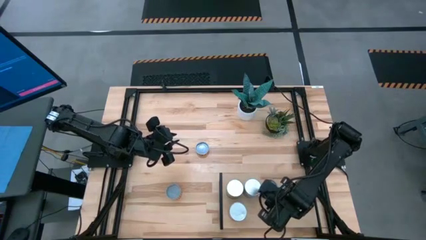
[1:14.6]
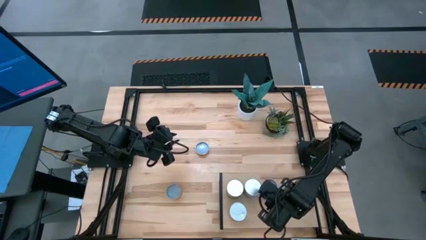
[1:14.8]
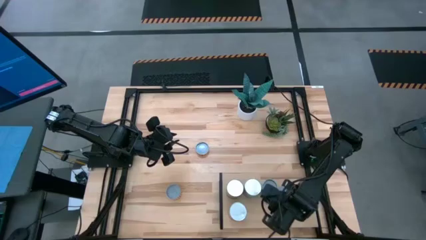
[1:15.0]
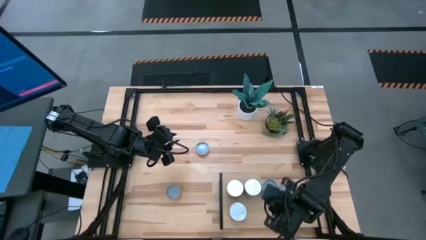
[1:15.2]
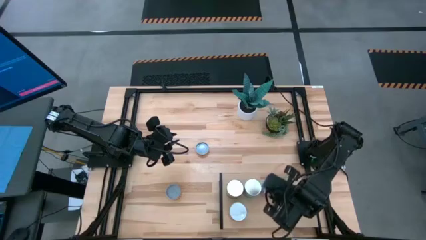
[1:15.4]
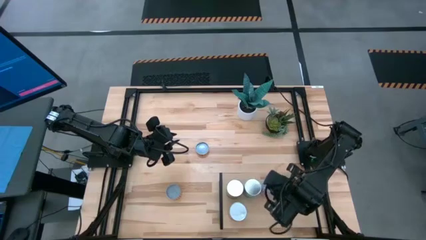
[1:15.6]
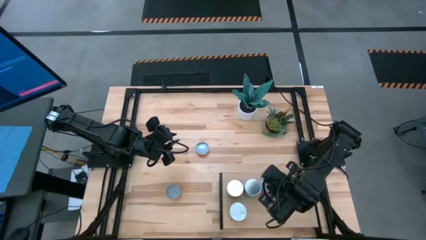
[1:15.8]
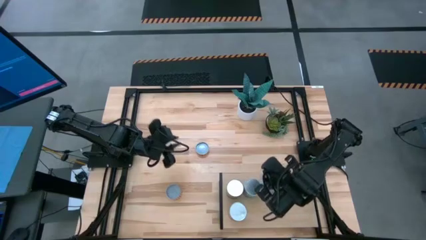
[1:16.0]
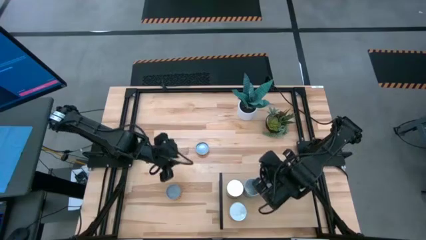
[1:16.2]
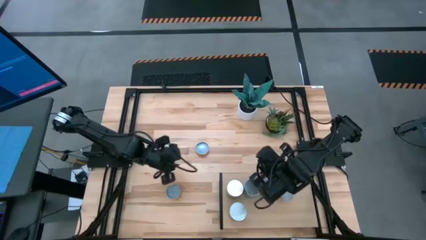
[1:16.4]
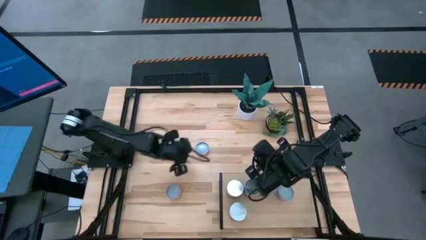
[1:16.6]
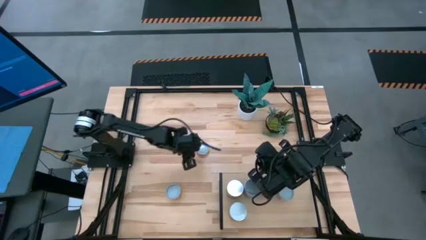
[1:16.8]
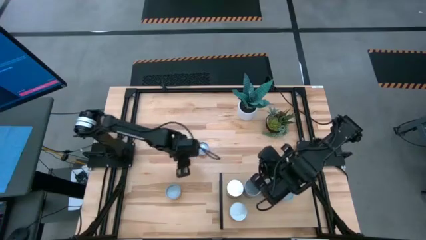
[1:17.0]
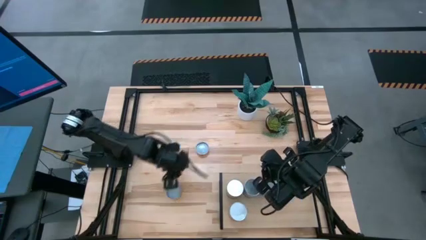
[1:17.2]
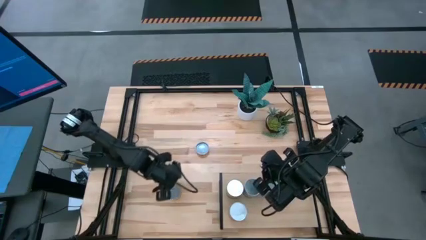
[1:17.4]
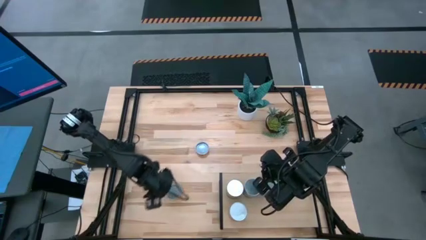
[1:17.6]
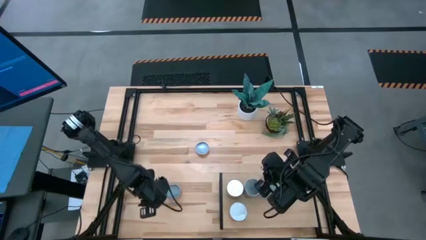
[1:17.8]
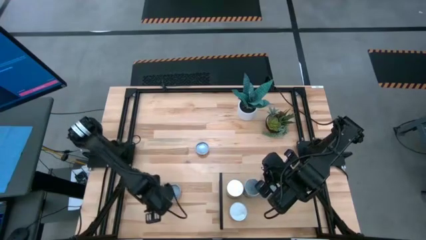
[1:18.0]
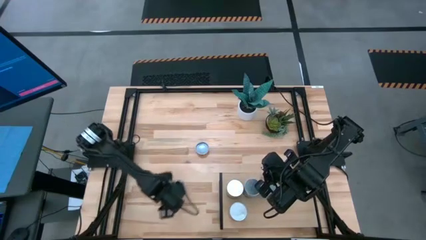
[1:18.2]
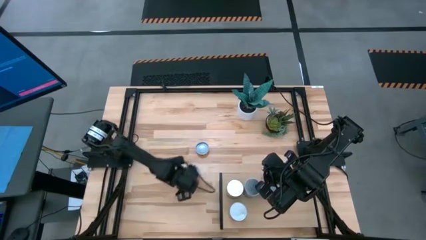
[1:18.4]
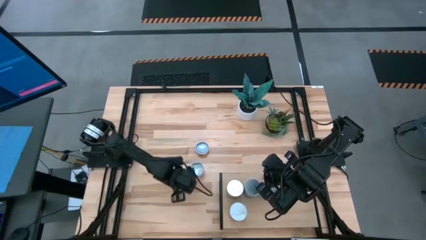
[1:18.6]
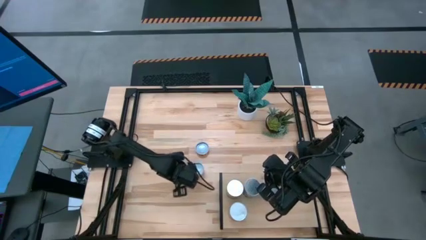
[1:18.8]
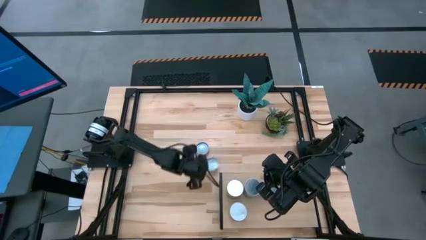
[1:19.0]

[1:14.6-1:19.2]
Task: Pick and place cans onto a shelf
Move the yellow can from bottom left to the center of the table

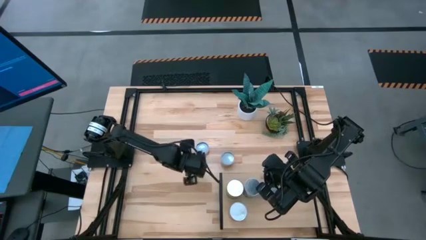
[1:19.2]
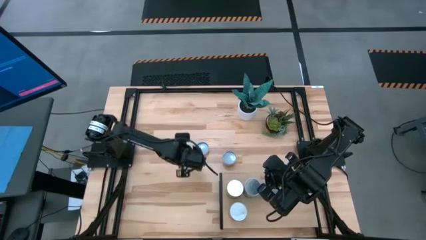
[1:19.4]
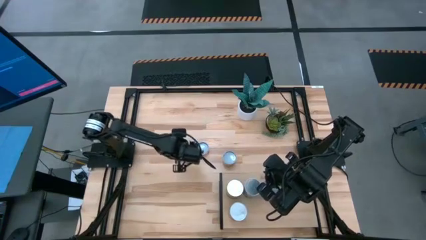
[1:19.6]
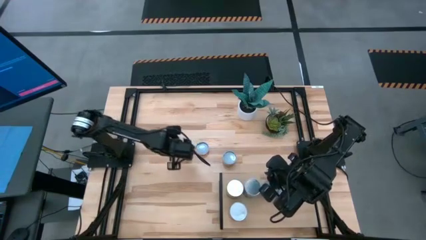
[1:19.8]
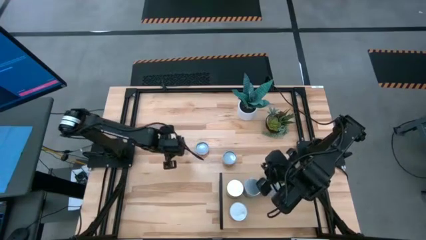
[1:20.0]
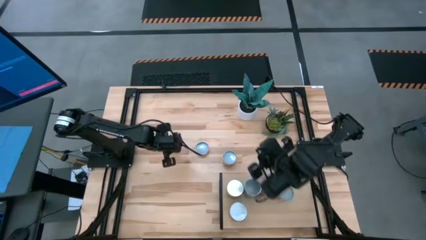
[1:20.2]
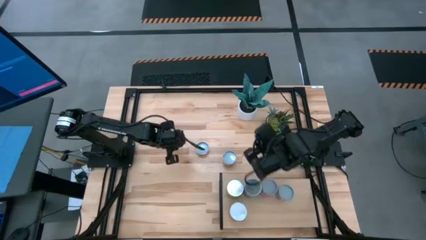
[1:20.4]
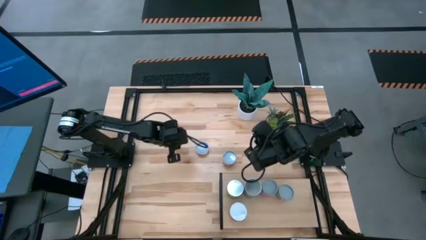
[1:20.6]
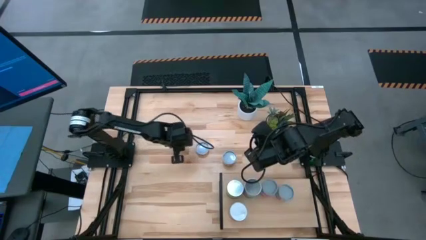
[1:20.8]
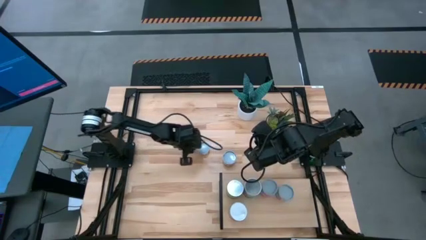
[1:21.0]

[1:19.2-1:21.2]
Adjust the yellow canned pineapple rings

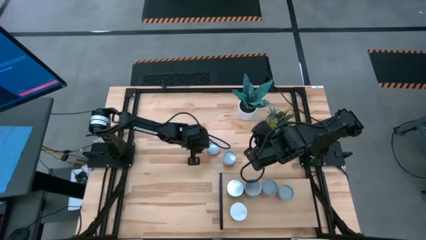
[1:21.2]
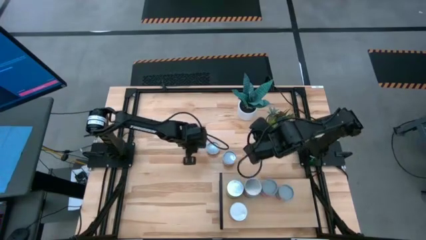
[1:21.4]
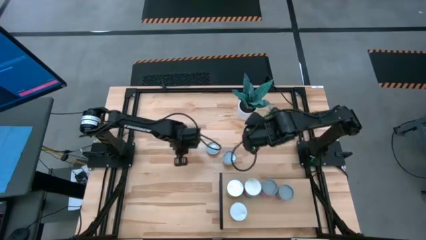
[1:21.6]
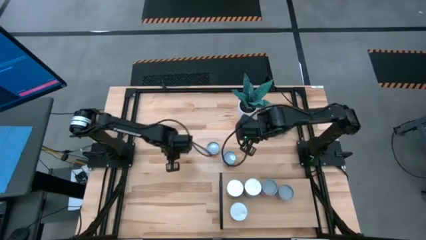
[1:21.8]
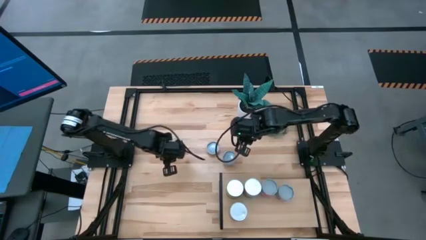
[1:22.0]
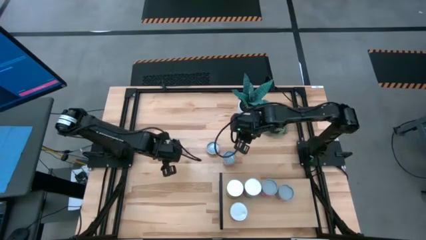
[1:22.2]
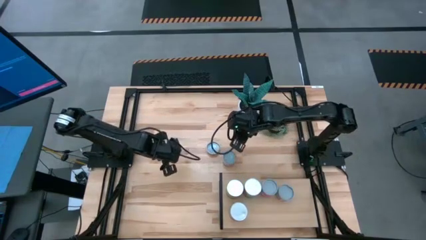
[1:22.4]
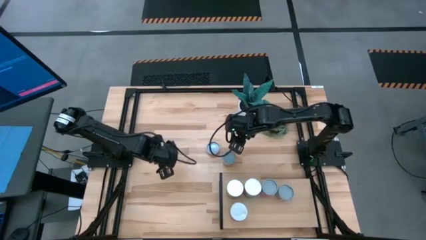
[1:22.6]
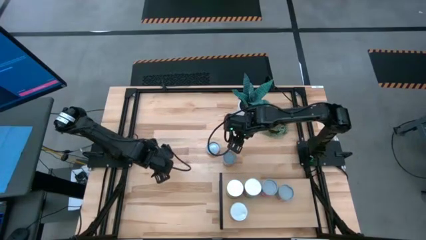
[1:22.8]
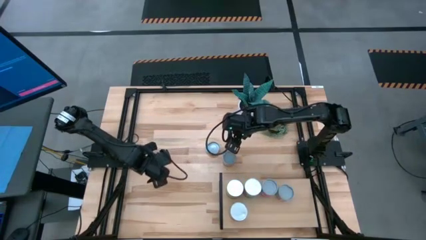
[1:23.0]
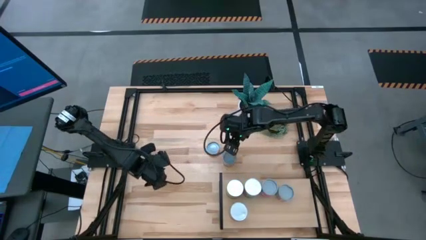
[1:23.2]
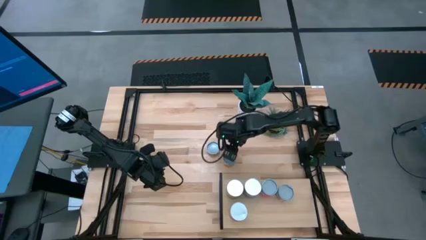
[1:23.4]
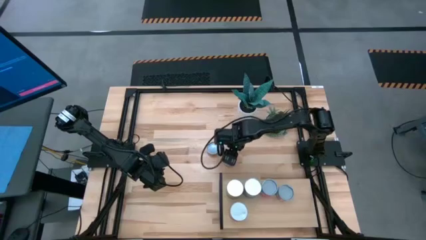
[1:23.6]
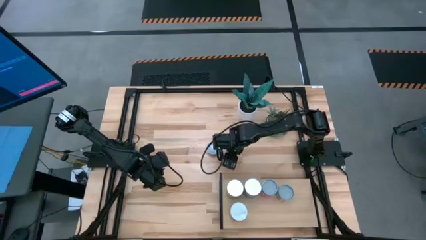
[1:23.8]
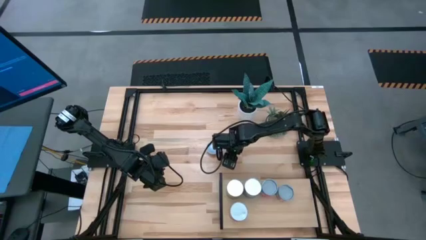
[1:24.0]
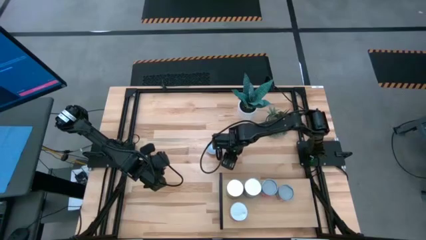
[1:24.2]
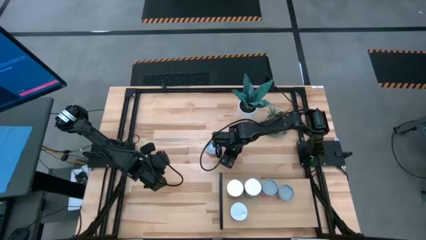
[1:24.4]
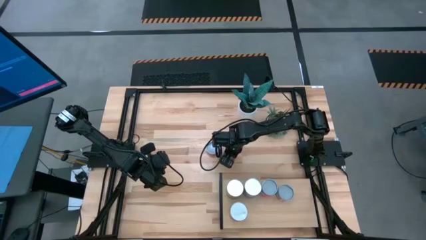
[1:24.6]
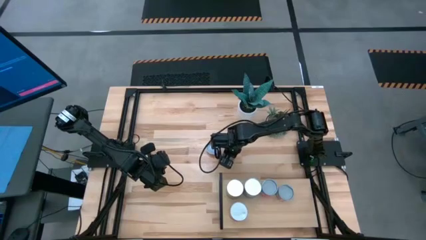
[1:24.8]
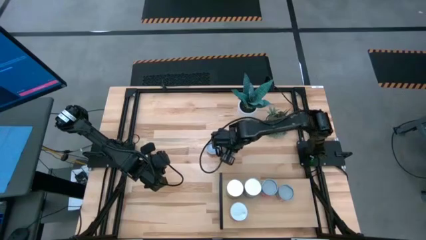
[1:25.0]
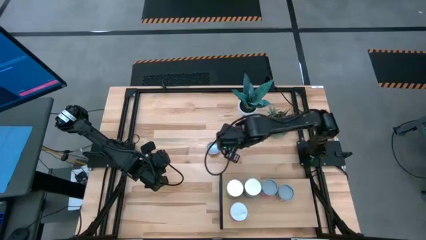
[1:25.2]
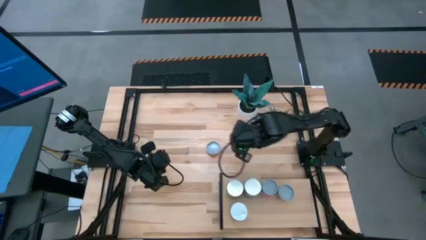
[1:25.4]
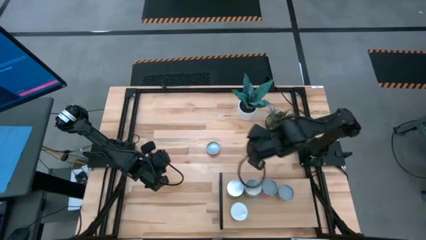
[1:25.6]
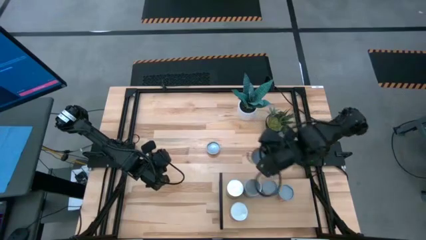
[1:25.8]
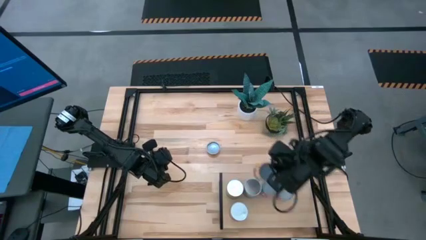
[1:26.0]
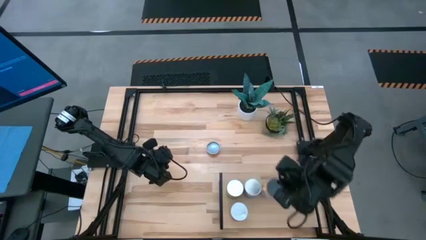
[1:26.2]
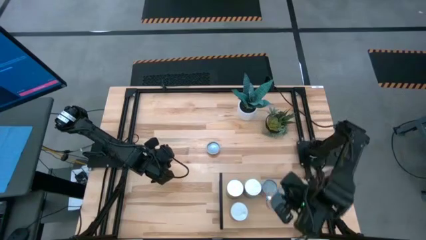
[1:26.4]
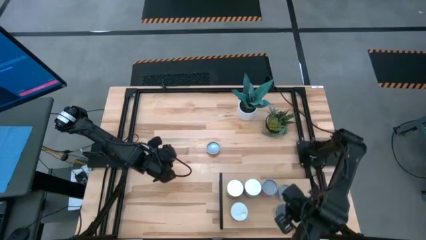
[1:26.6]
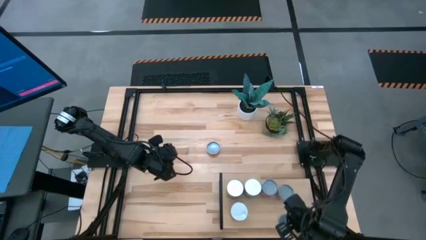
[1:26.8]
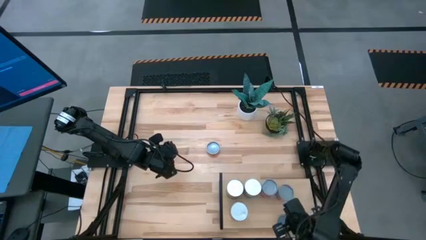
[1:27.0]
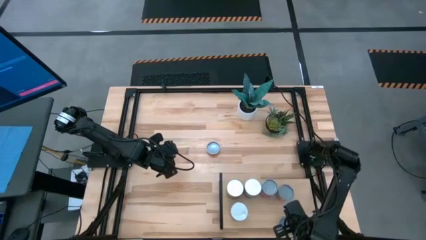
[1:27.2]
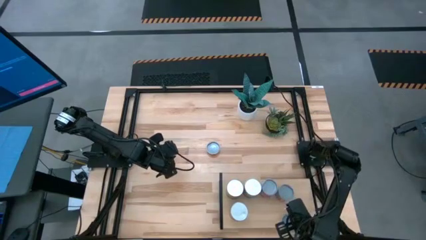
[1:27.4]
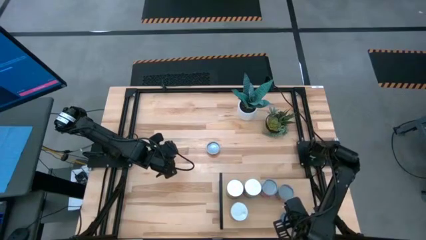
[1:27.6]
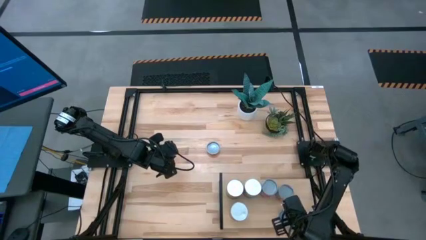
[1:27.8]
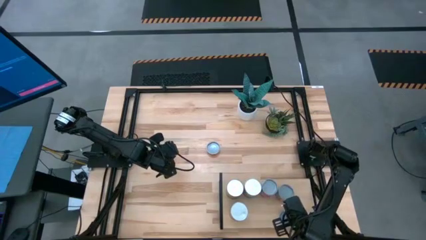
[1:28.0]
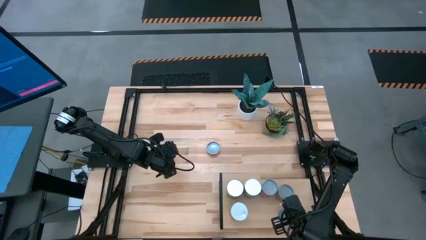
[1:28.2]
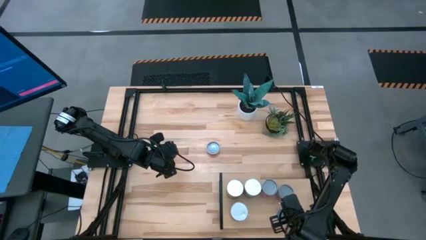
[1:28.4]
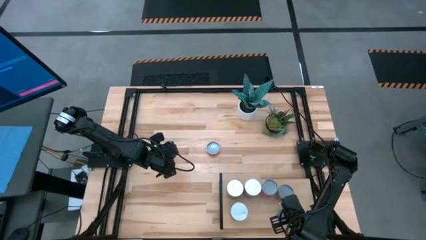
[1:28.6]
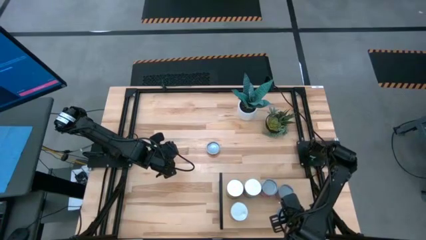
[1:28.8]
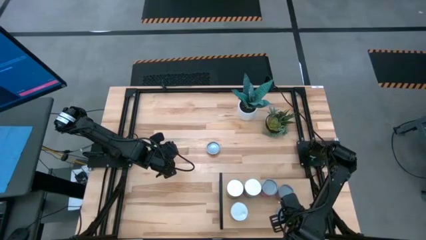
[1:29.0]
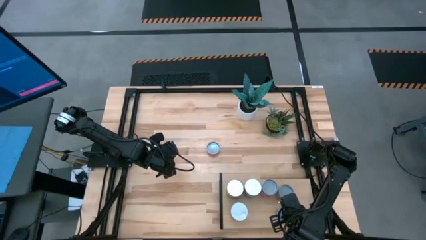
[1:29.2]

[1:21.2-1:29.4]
Put the yellow can on the shelf
